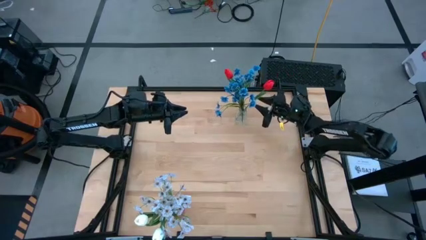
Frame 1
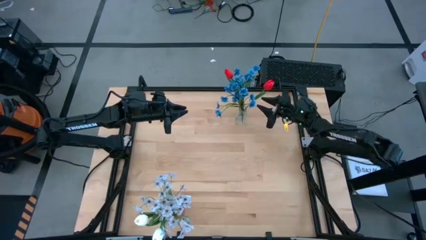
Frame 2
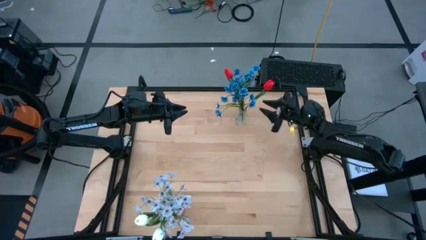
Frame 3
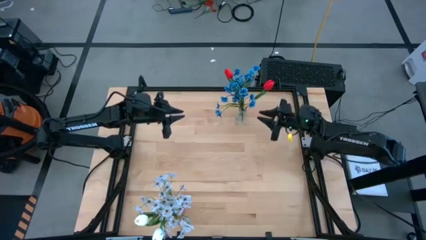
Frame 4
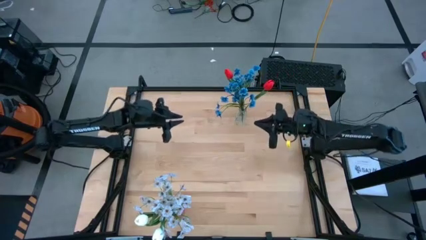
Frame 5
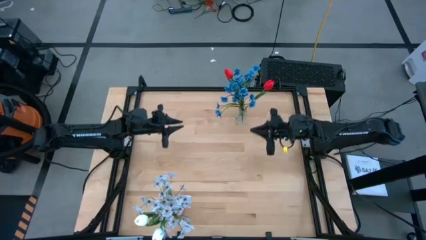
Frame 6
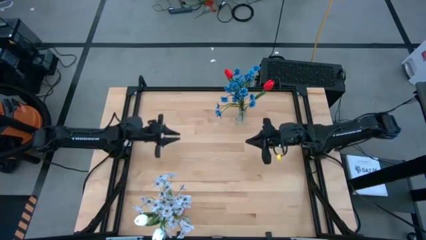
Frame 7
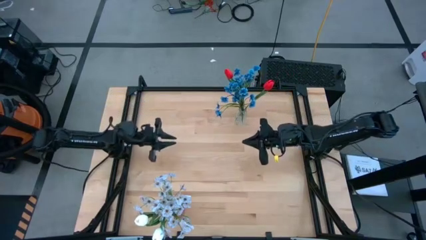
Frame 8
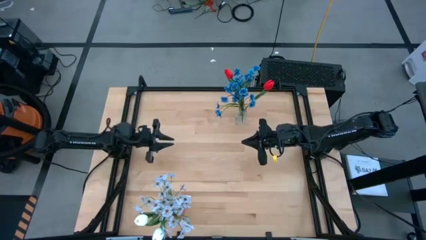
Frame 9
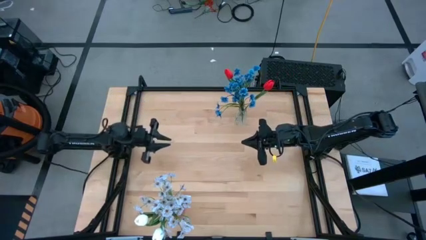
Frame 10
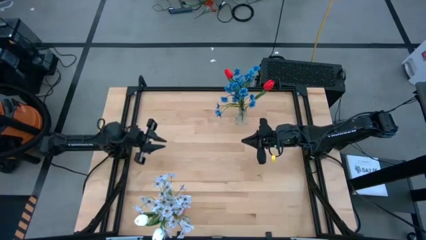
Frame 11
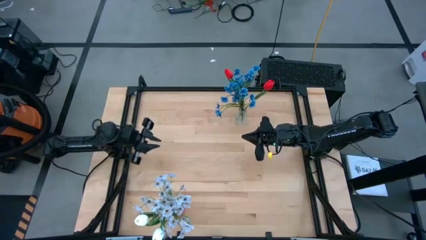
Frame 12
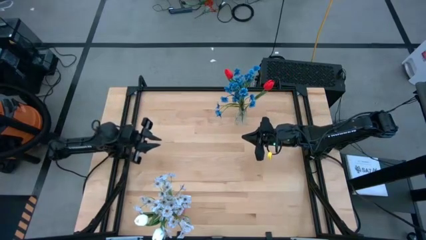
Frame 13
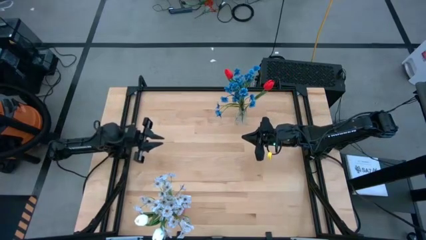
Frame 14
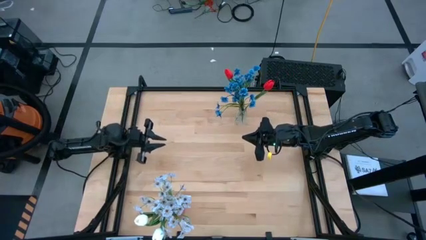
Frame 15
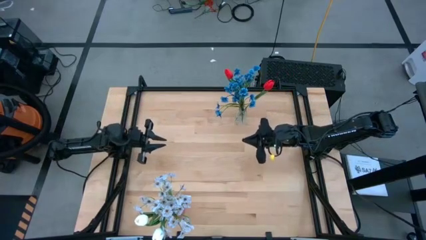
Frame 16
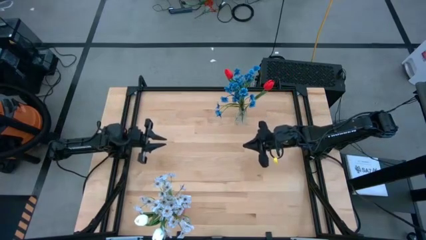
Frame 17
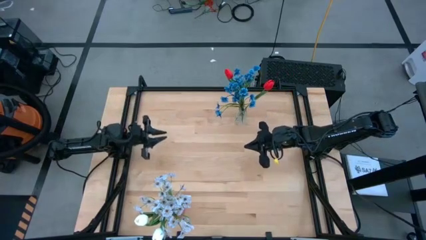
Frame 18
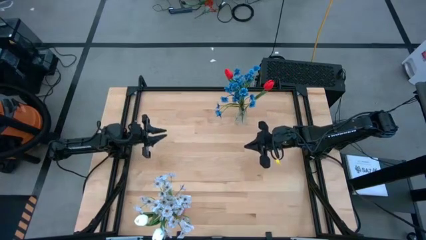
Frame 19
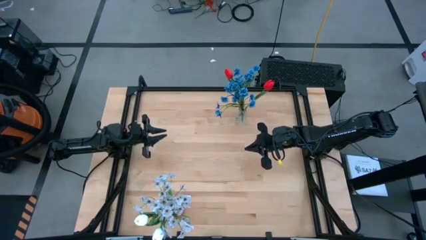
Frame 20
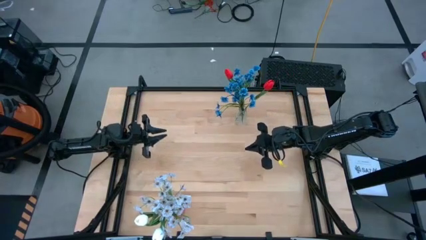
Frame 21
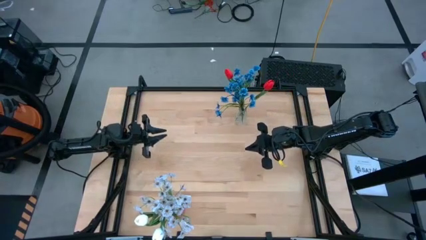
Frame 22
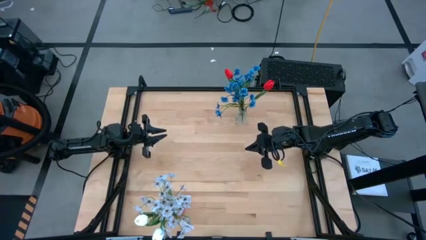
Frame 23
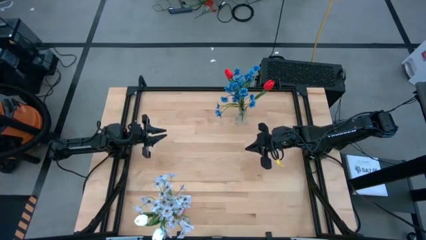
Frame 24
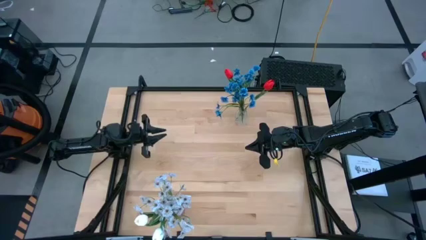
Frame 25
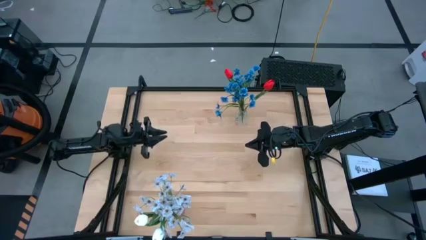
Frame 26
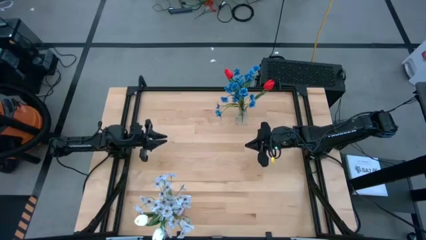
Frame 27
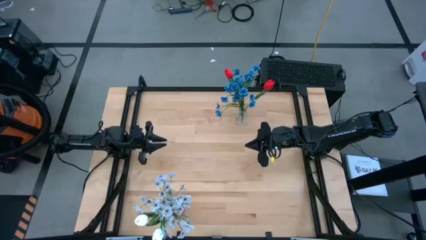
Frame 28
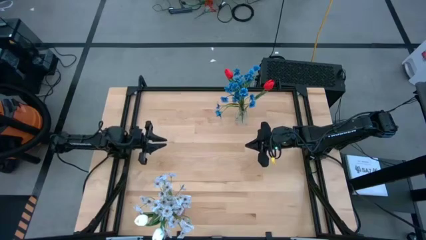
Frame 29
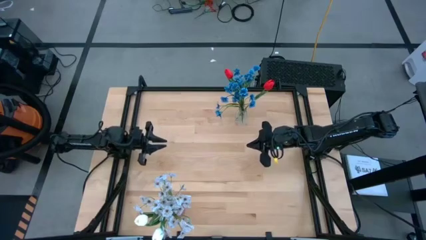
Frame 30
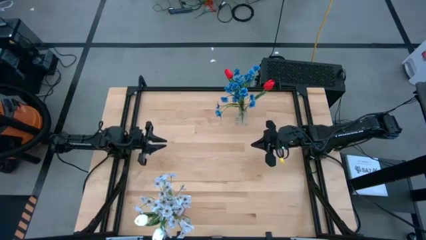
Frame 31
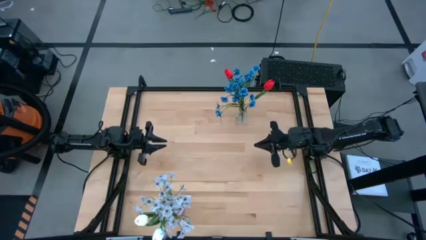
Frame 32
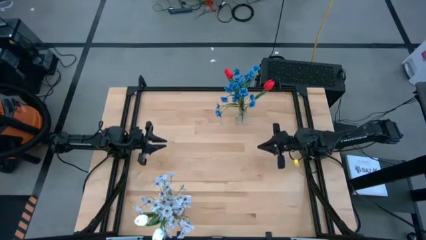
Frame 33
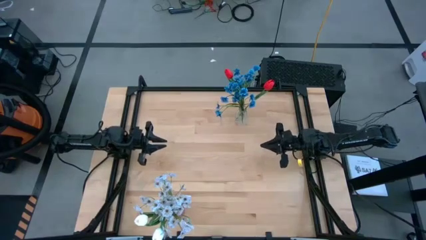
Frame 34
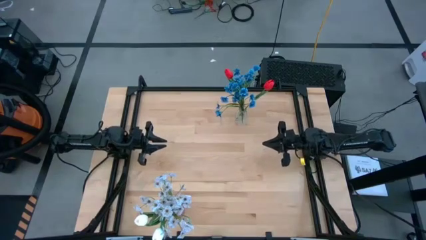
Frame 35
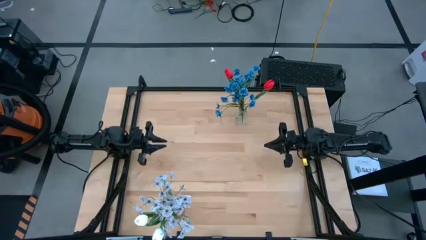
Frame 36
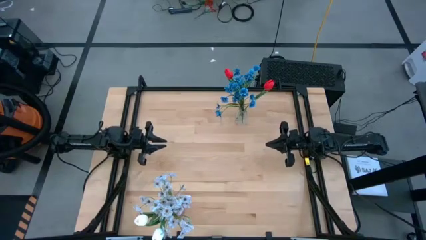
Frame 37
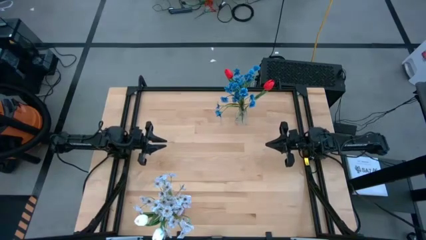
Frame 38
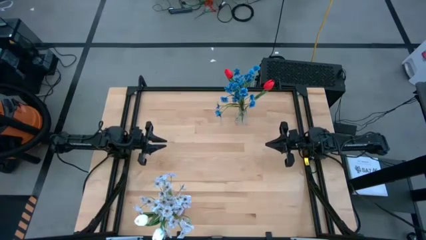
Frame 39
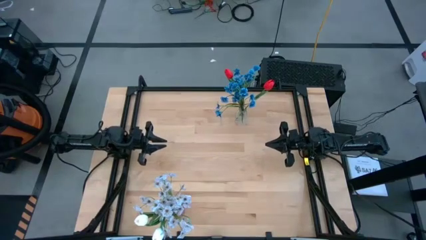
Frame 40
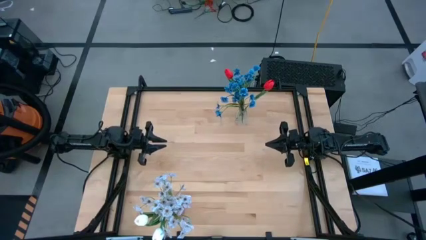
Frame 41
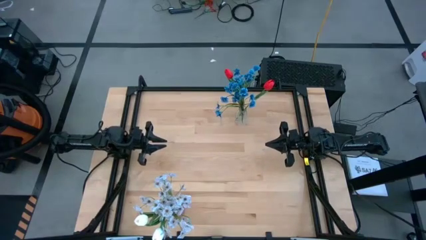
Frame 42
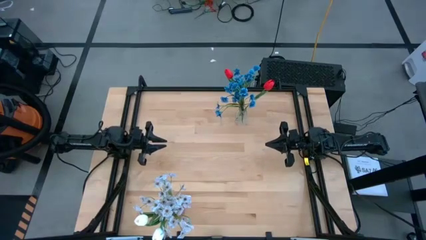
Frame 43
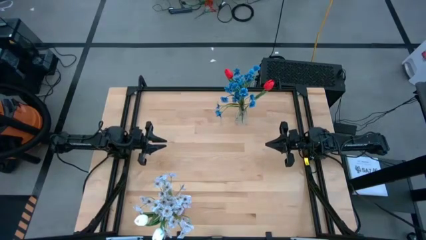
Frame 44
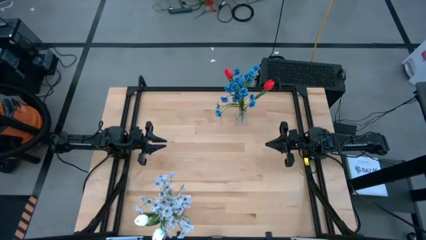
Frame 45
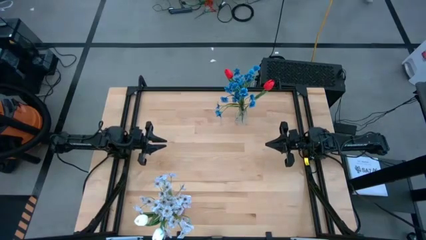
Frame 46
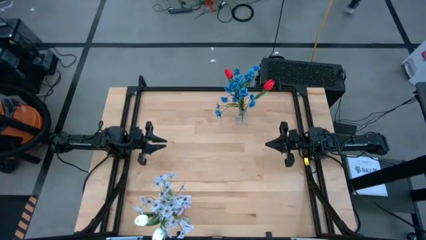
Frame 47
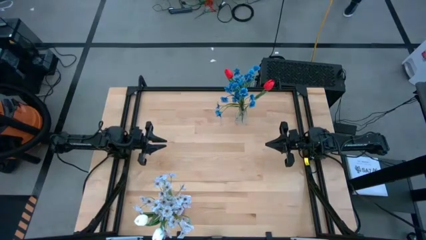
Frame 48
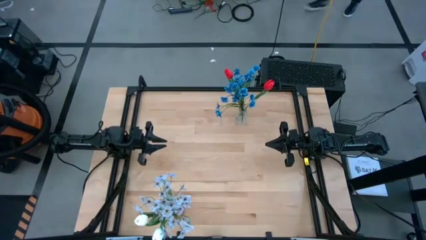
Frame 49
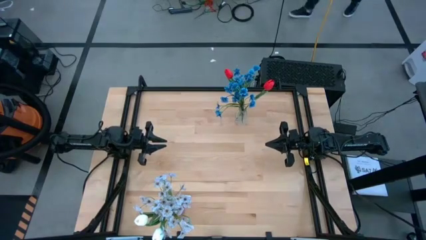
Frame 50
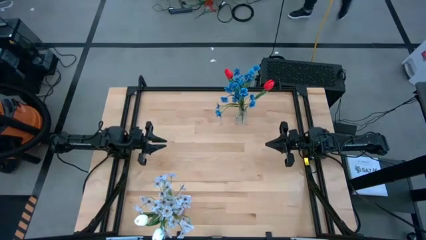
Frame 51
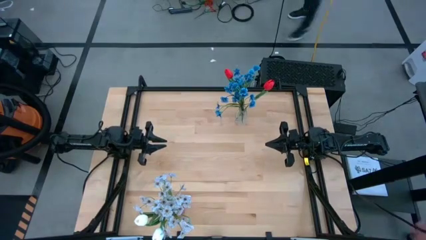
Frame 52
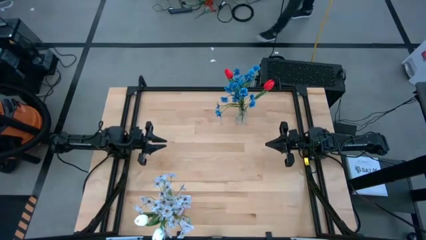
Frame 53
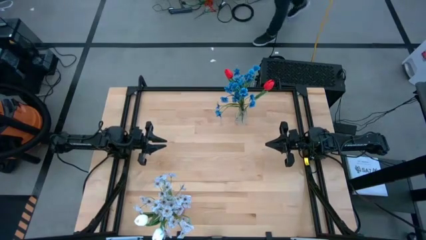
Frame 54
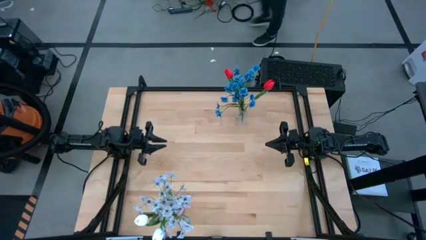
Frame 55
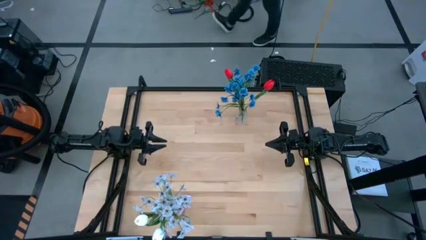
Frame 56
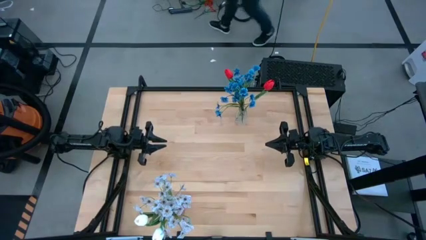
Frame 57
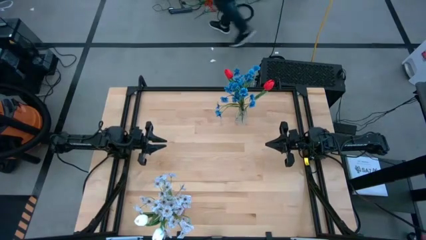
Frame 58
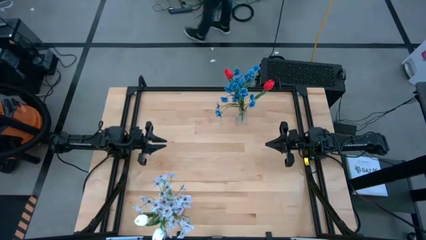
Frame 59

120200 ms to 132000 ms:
Task: Sort flowers into vase by color
Return to Home Position

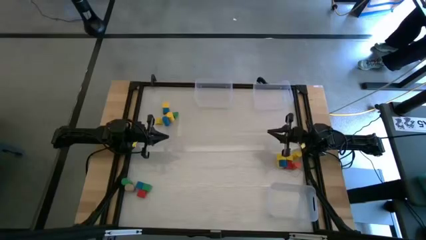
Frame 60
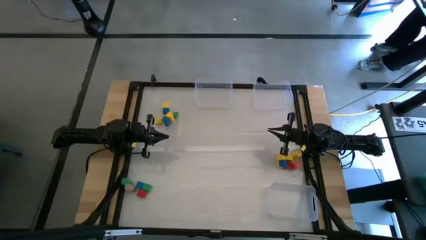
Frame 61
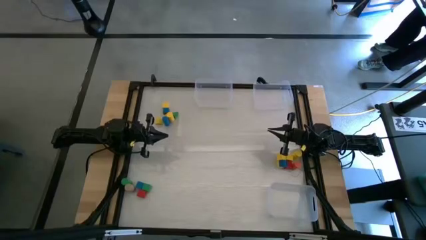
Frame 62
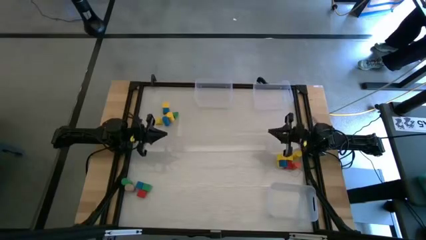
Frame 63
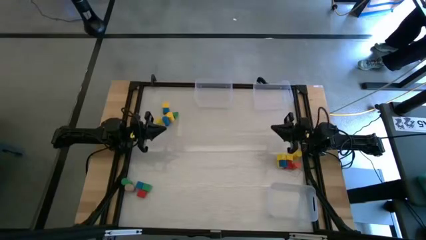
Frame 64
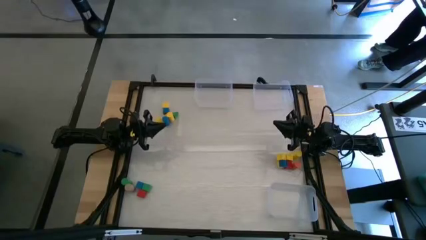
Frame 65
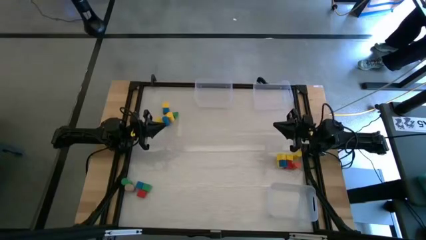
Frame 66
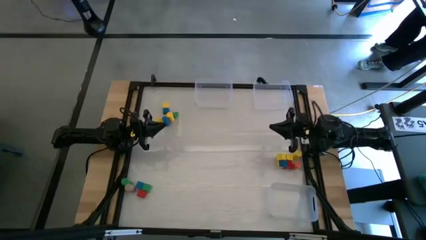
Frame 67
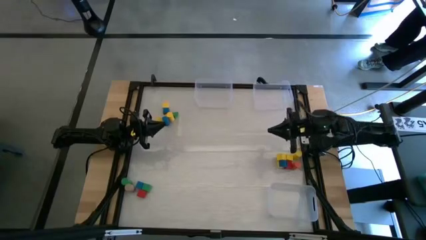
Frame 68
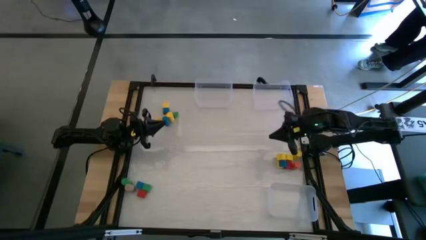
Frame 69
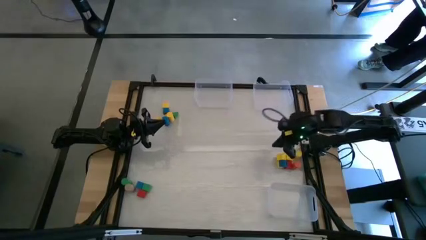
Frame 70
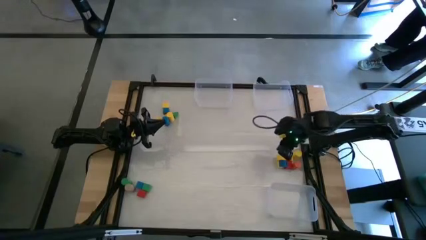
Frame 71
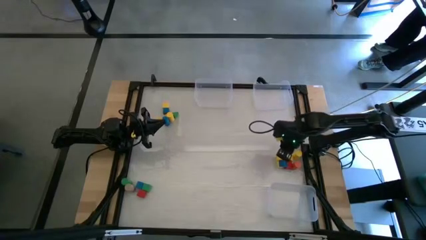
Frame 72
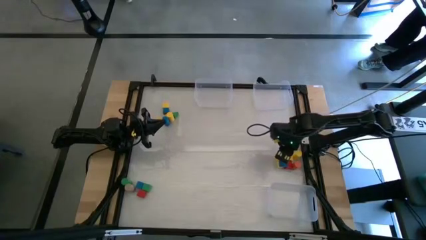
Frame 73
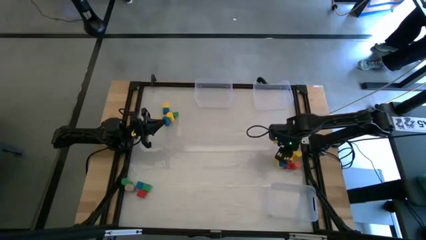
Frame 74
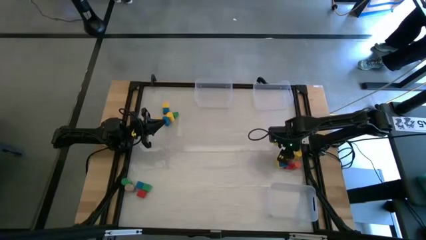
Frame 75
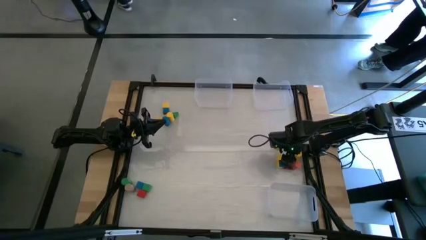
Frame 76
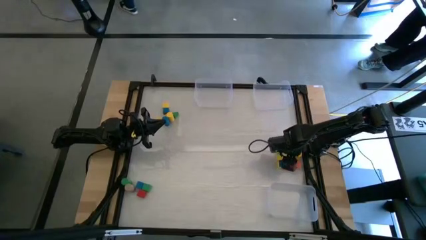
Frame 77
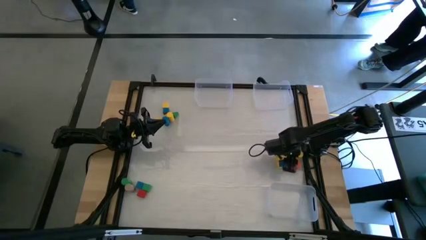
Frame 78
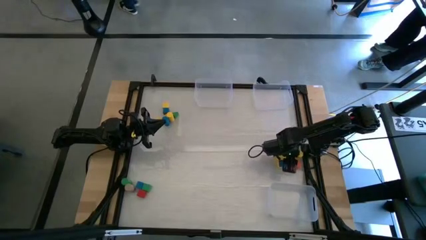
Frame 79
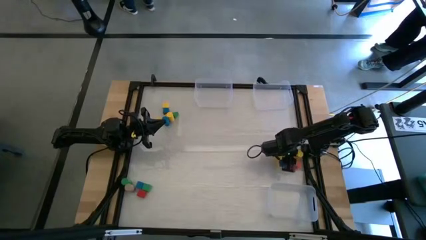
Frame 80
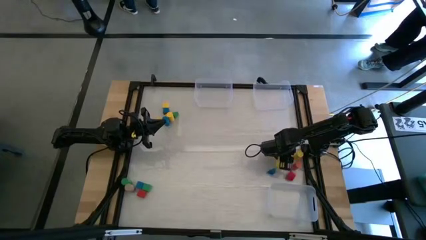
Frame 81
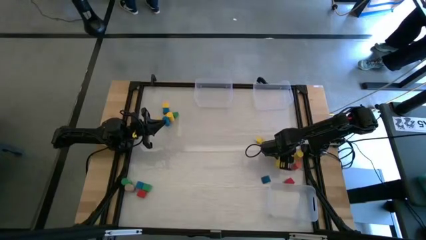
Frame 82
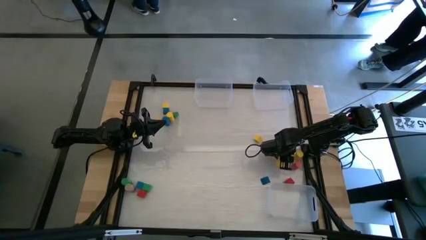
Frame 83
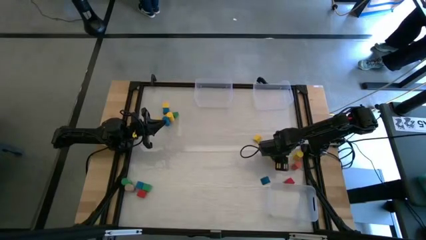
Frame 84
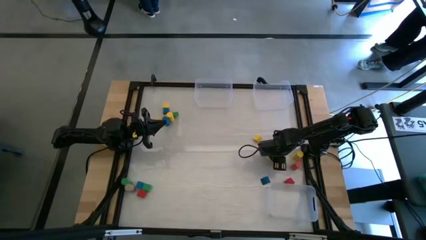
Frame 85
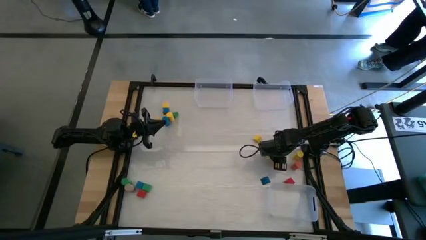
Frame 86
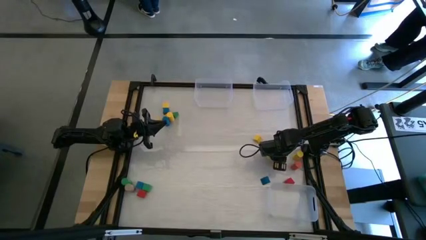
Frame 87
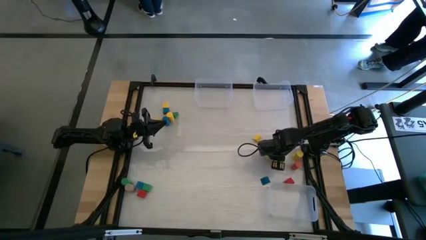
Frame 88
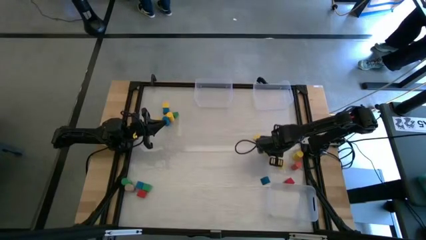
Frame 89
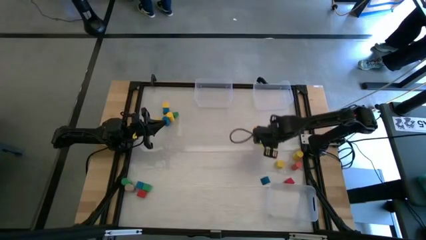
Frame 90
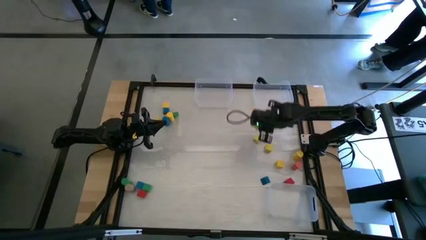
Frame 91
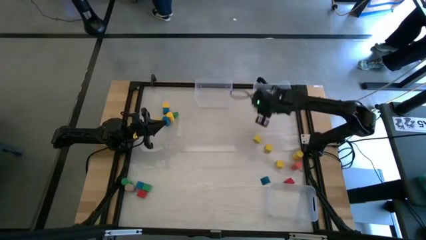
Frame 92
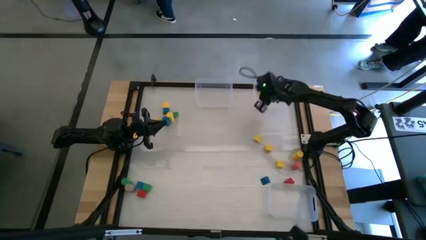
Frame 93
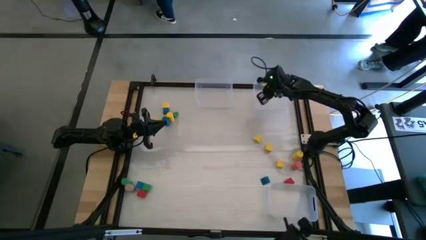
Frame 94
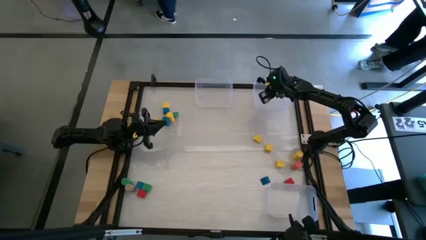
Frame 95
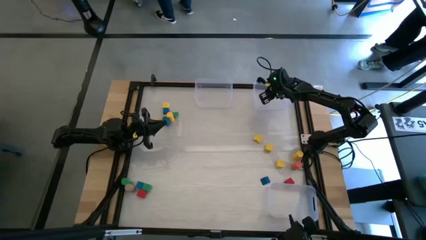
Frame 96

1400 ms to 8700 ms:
Task: Sort blocks by size
Put the yellow square block into the top right transparent bin
